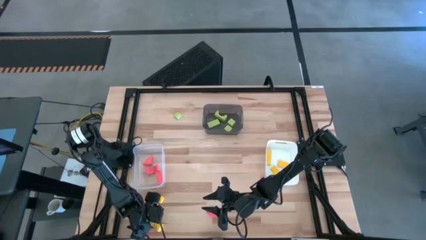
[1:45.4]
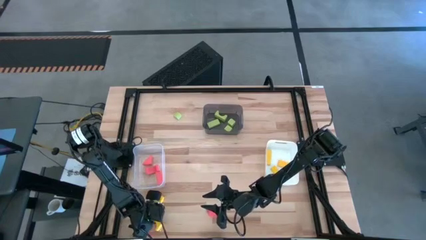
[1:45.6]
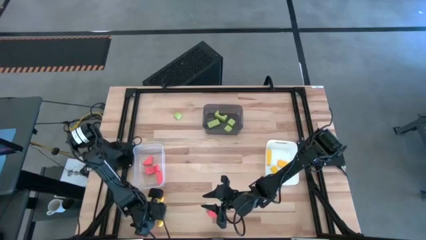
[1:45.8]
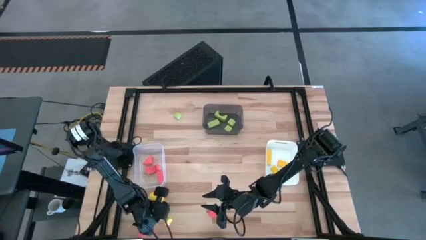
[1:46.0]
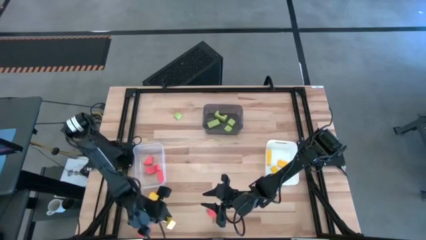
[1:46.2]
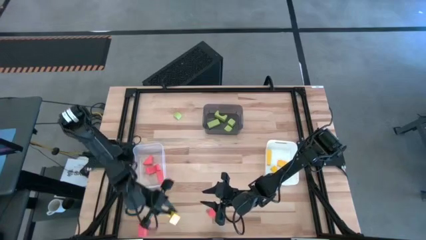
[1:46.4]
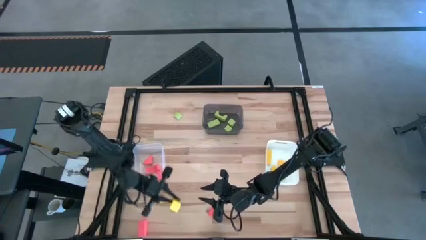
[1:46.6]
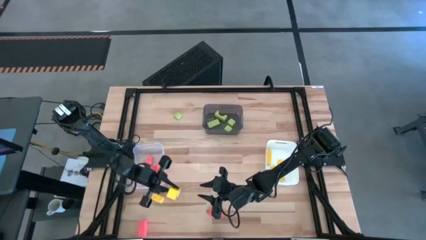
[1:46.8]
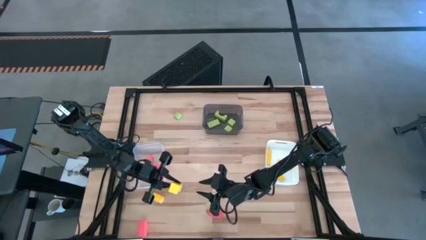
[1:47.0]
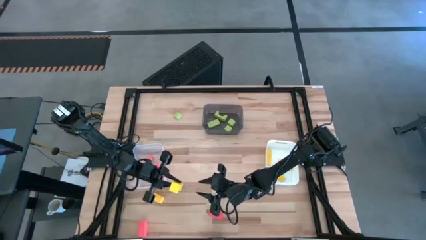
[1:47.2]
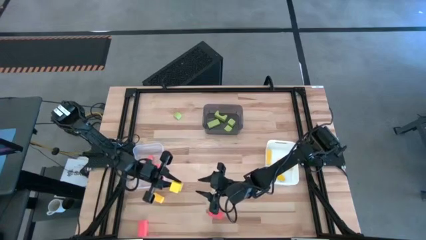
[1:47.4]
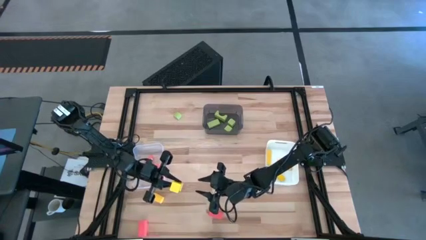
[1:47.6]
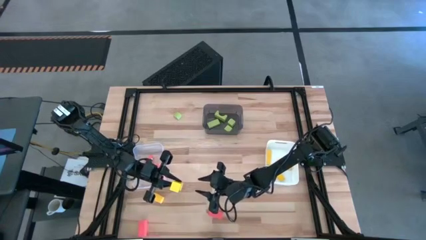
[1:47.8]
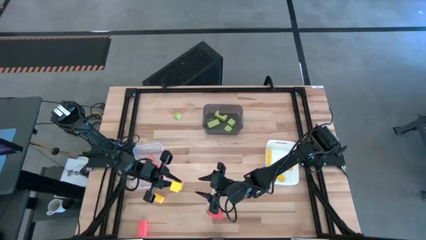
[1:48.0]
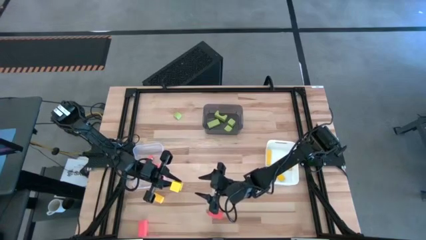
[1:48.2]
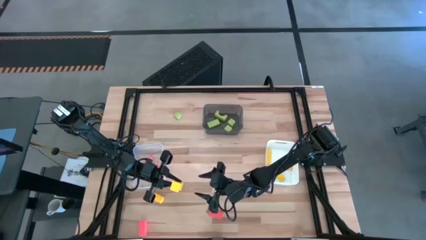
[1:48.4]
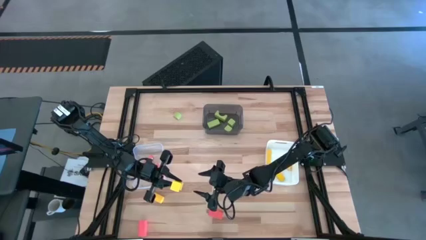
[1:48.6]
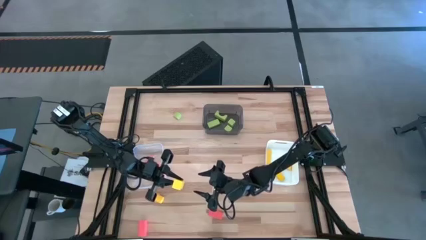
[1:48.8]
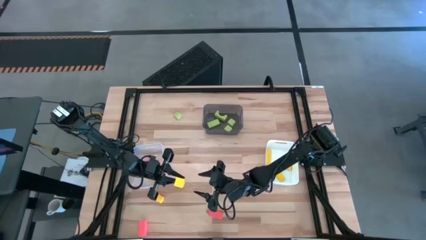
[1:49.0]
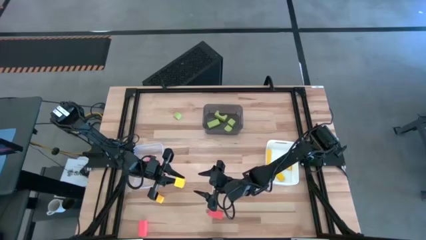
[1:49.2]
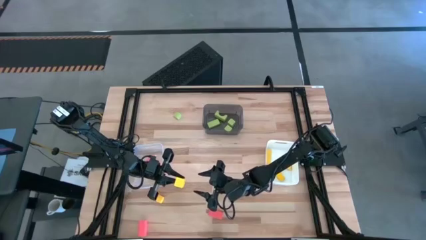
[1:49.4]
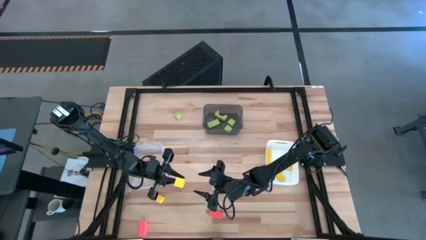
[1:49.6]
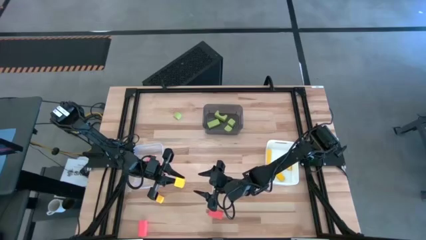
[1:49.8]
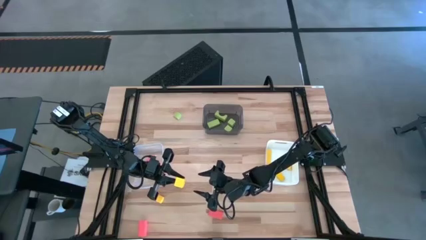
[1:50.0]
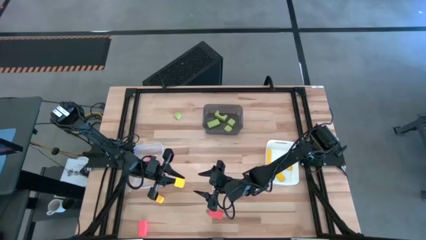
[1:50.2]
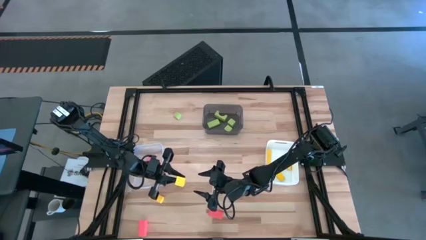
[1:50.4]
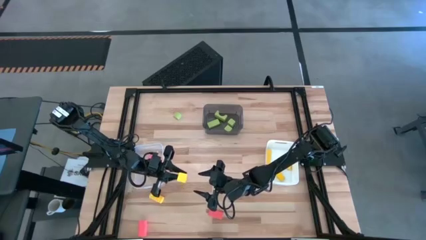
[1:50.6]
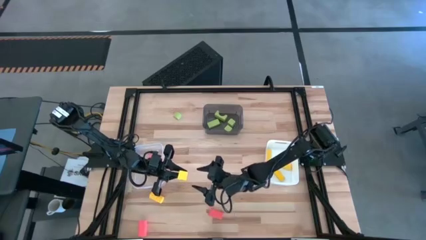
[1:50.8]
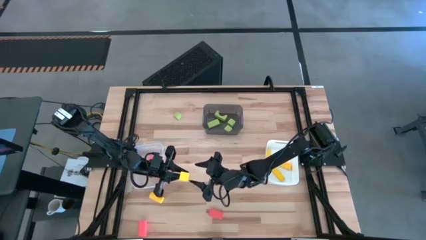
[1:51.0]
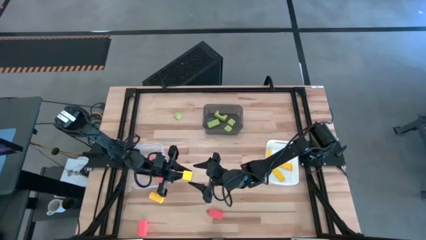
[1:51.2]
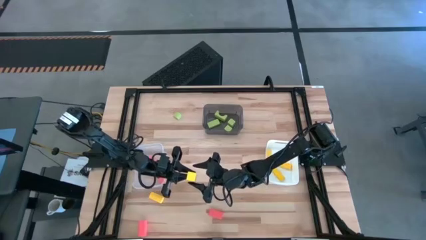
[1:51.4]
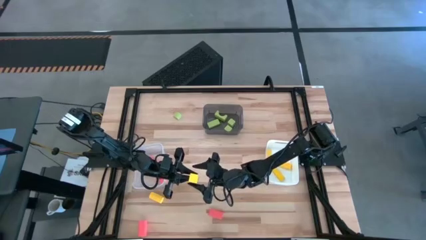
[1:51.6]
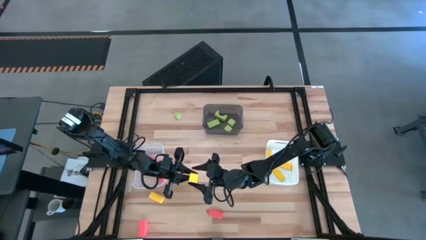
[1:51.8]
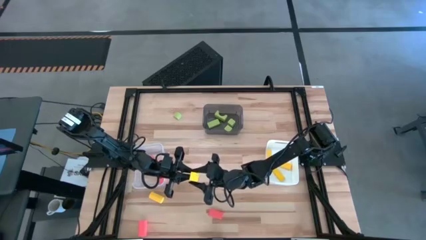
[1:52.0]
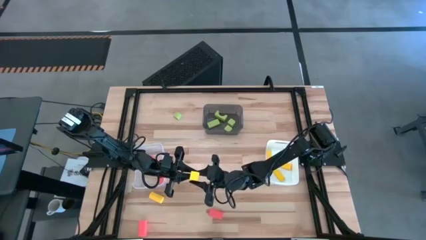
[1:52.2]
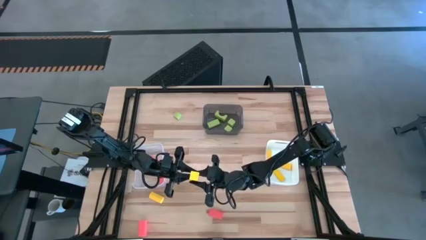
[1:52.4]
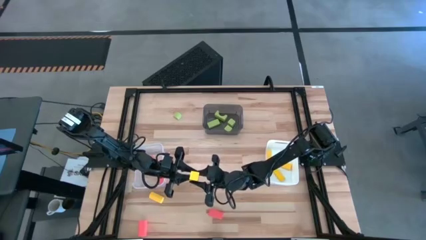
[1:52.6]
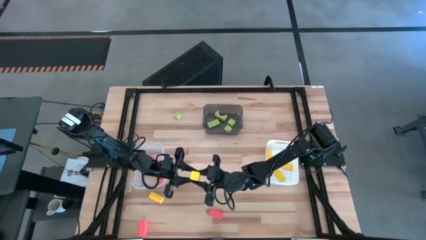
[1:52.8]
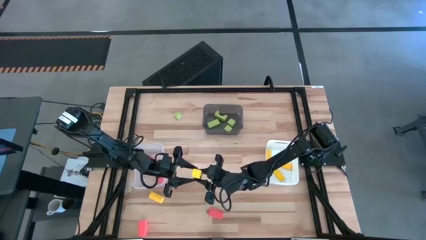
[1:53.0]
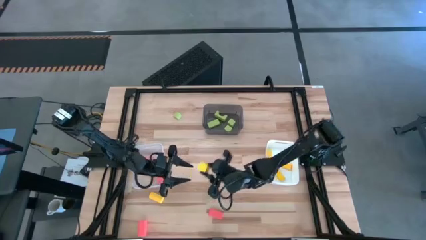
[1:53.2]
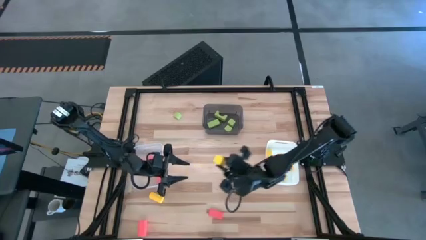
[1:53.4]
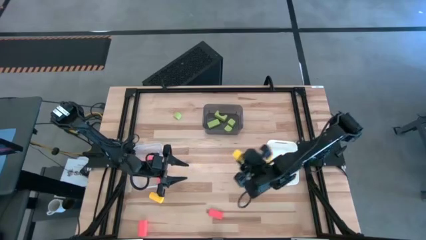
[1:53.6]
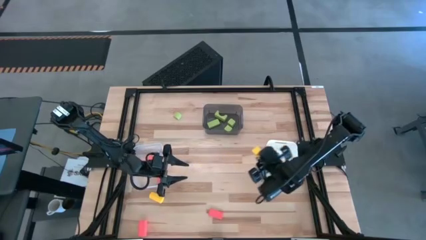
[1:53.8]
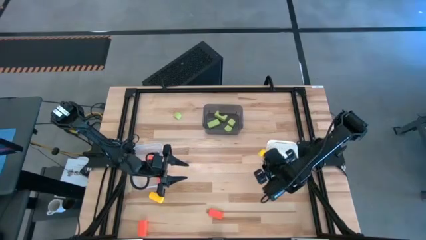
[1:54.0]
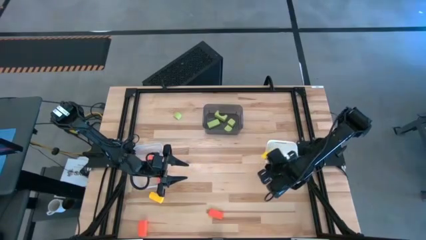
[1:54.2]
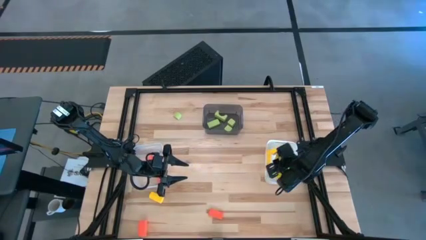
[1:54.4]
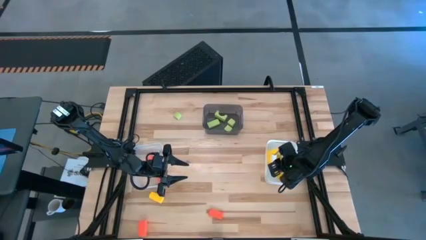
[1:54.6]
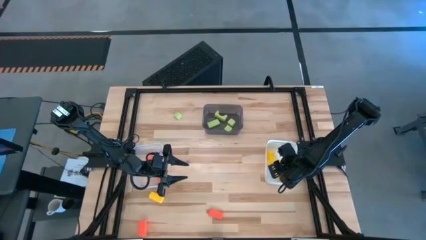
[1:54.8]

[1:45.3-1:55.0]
Task: Sort & place blocks by color
Put the yellow block into the white bin

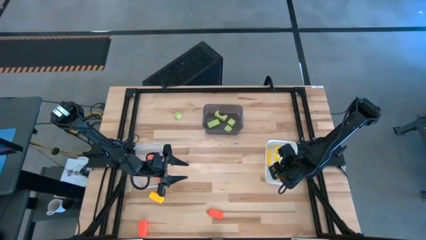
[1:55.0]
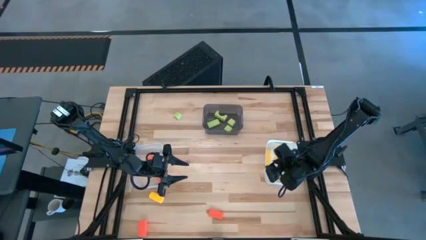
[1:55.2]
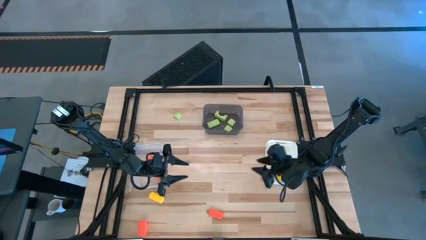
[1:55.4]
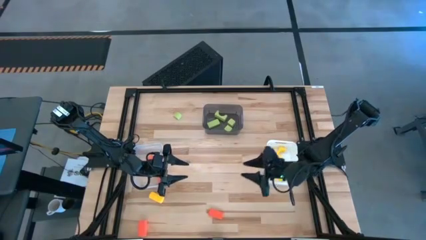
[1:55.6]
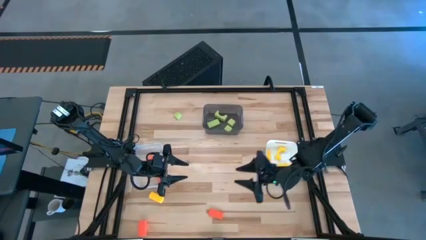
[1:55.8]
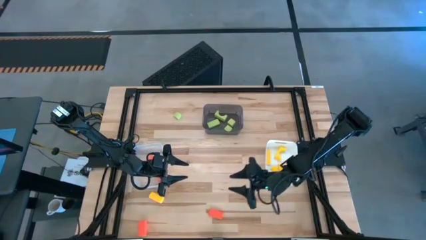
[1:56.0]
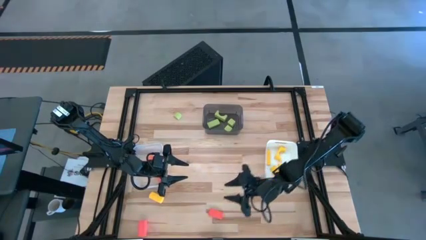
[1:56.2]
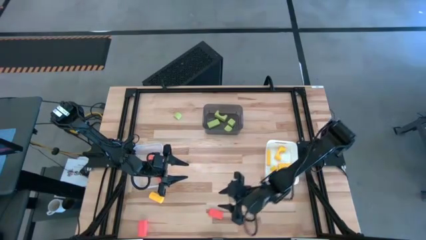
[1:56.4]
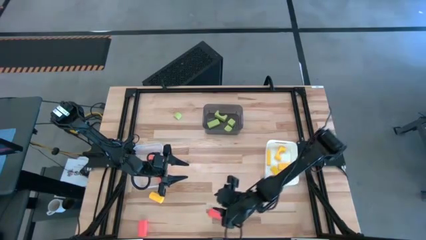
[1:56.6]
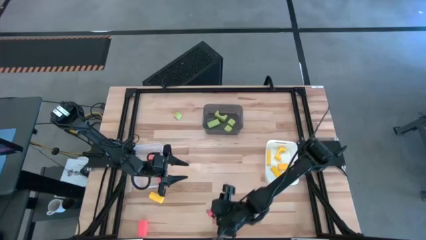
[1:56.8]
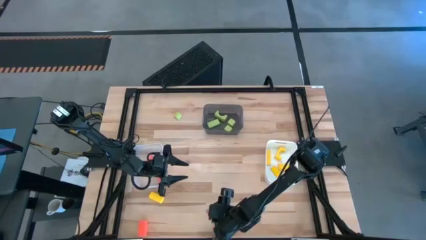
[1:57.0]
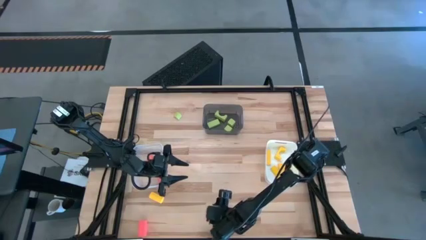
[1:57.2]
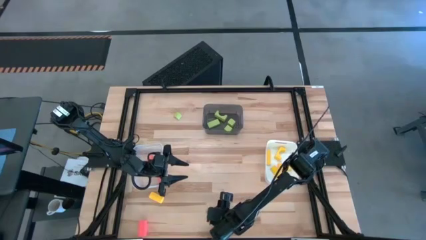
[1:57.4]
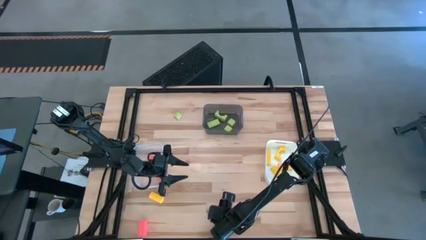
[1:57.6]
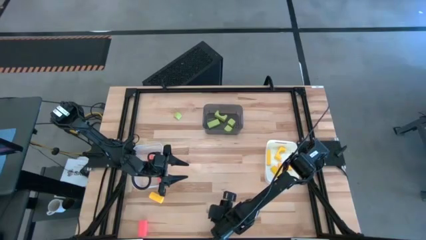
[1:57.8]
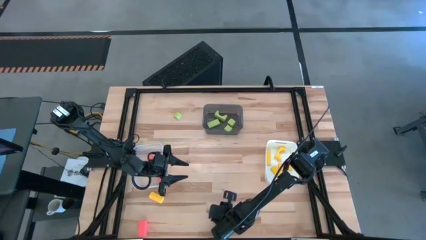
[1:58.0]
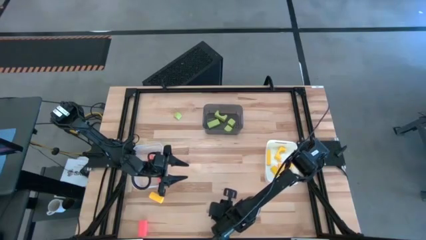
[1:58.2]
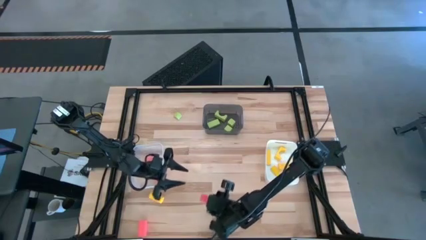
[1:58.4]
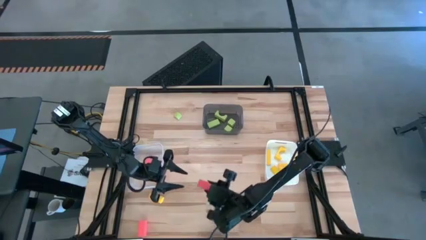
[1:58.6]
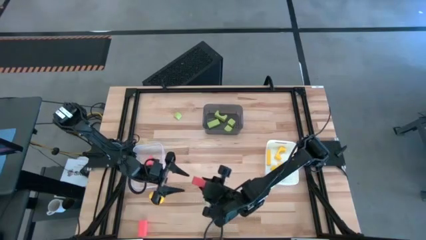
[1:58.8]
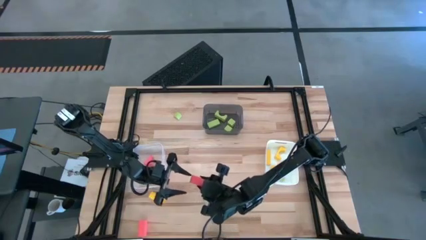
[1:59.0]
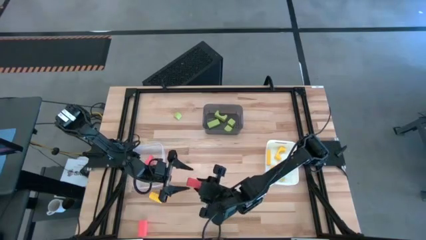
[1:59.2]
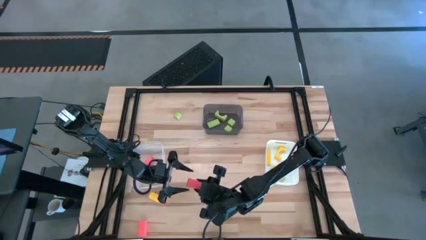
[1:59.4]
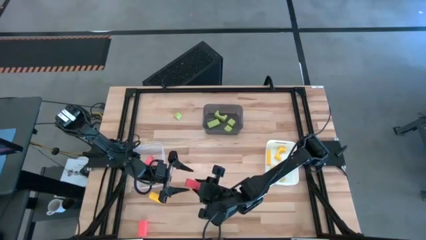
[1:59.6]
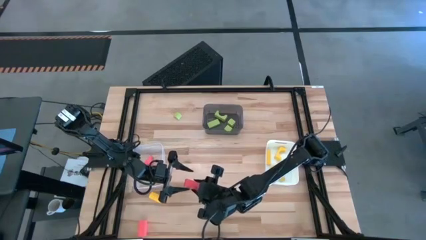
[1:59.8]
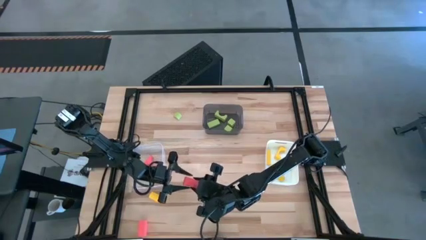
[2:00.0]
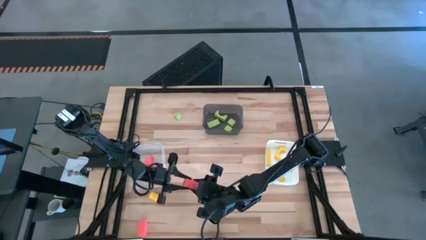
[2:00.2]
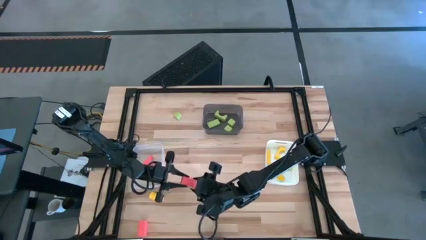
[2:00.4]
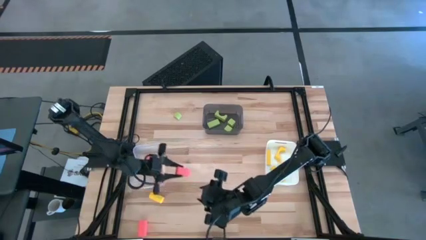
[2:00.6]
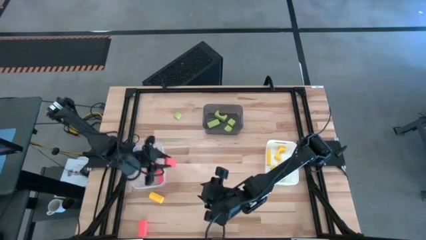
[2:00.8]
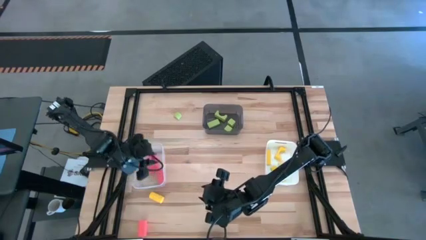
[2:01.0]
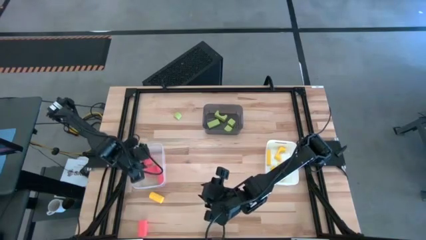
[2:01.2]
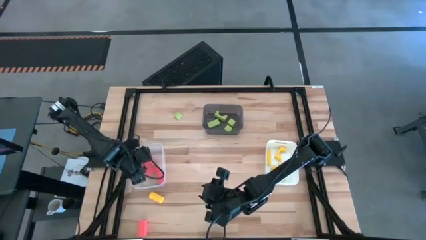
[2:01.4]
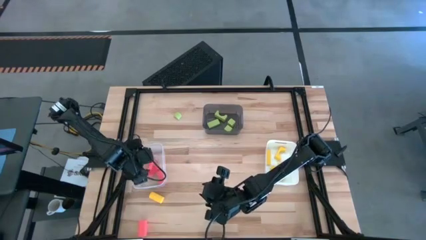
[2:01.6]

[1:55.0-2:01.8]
Put the orange block into the transparent bin
